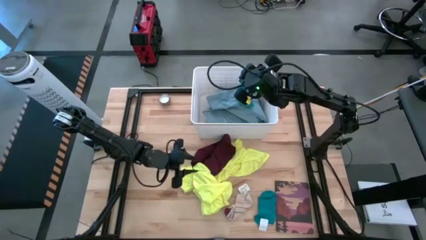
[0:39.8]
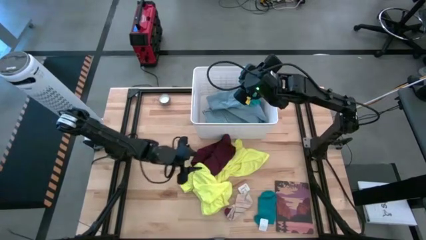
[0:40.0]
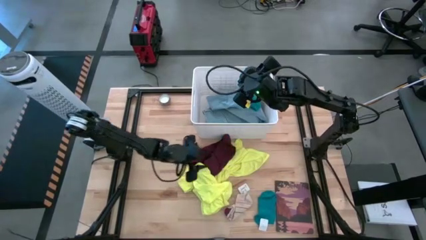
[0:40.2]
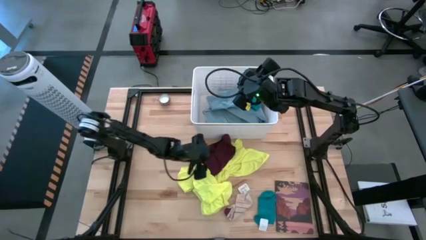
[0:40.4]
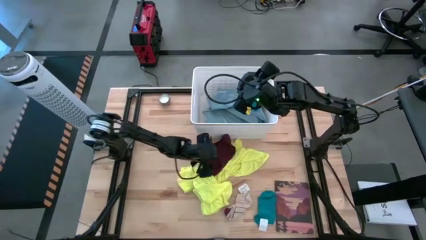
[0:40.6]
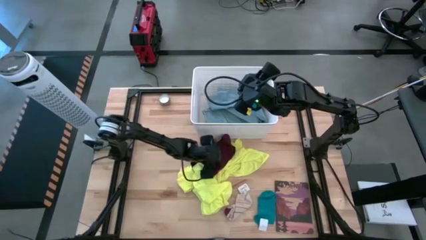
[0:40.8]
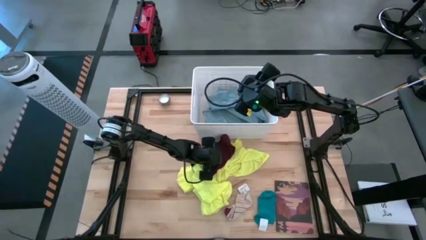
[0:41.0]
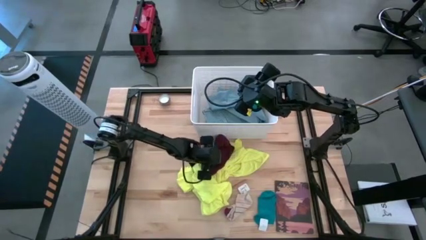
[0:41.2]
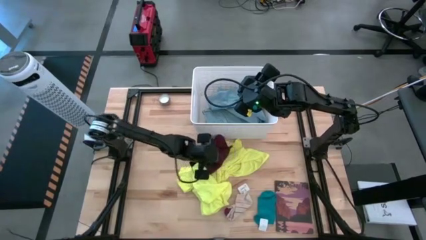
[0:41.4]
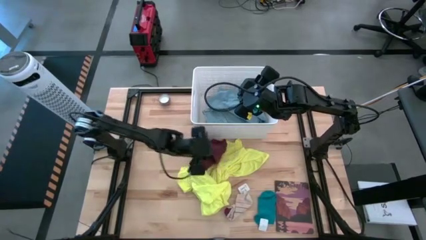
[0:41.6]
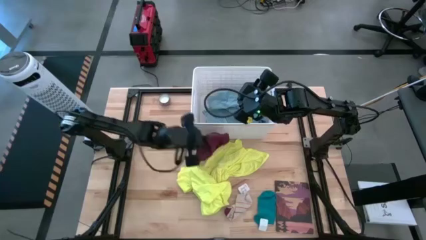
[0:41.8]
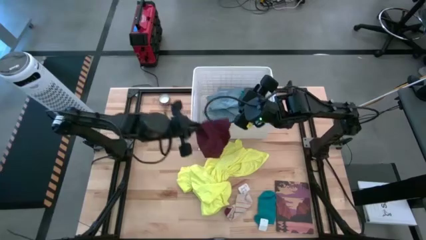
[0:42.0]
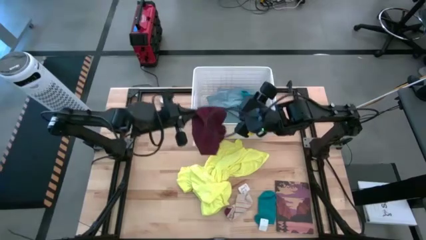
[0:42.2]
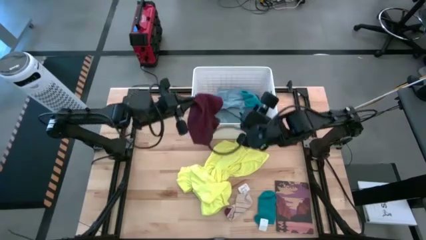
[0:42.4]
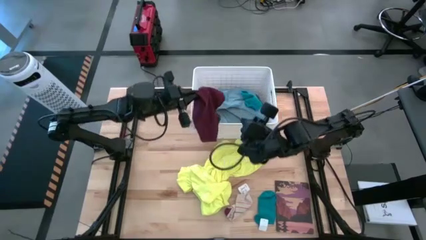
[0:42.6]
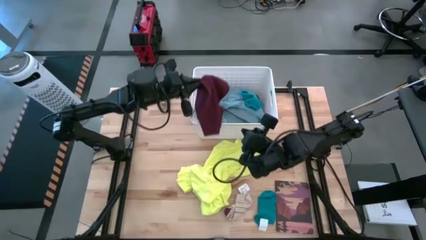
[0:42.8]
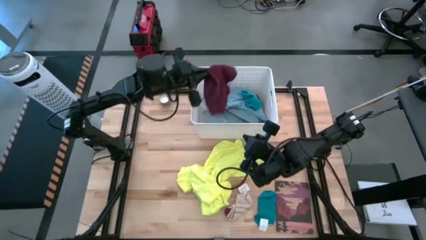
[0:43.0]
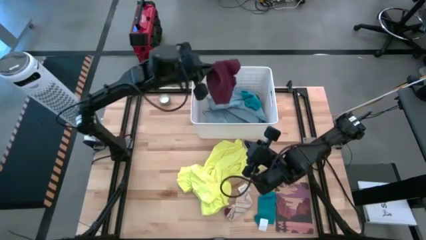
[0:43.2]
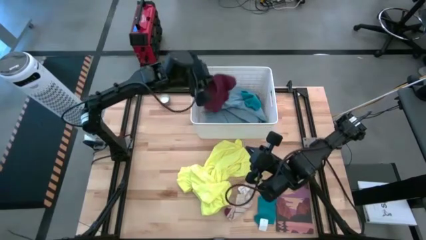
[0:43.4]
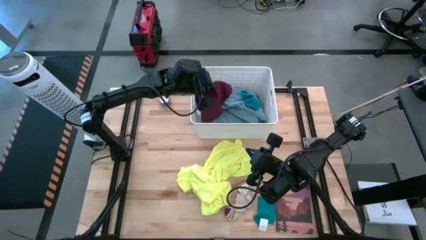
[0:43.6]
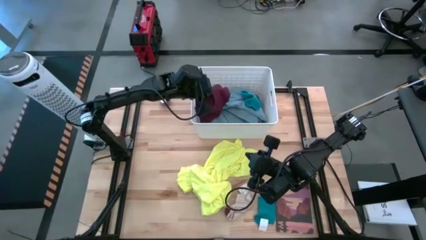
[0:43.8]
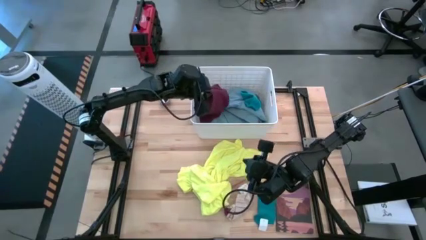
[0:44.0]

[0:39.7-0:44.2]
Task: Sort clothes
Put the dark red underwear into the white bin

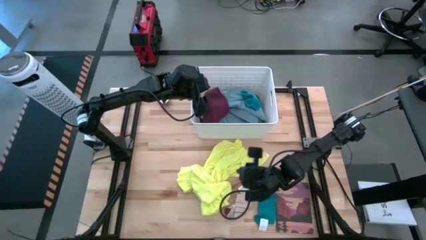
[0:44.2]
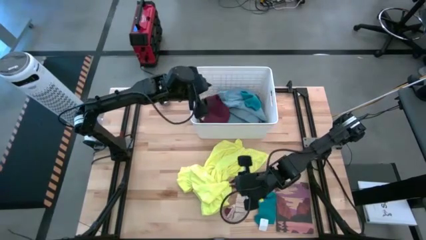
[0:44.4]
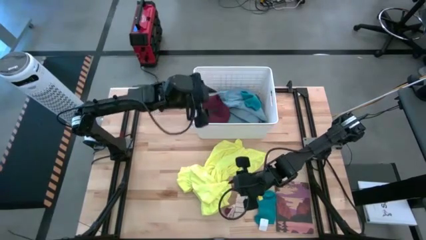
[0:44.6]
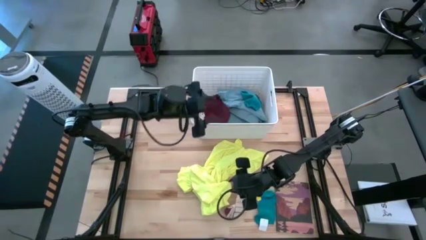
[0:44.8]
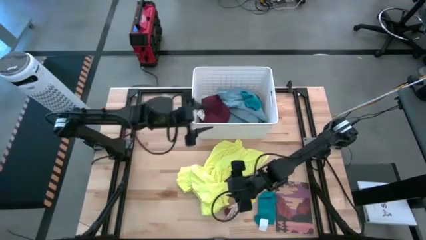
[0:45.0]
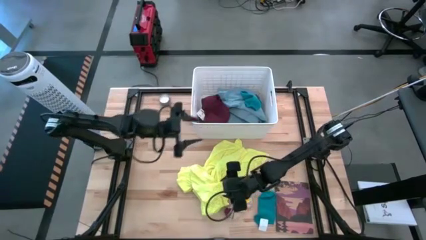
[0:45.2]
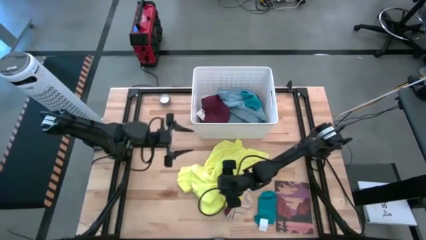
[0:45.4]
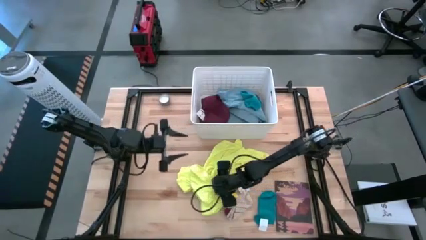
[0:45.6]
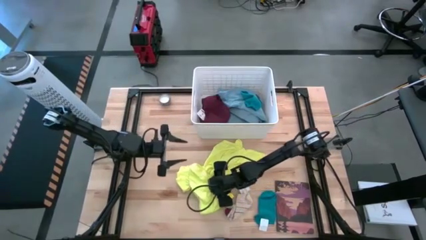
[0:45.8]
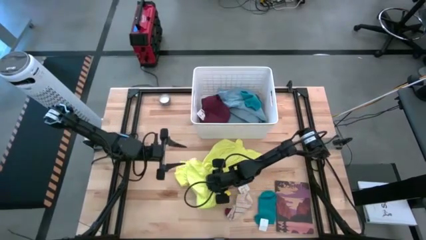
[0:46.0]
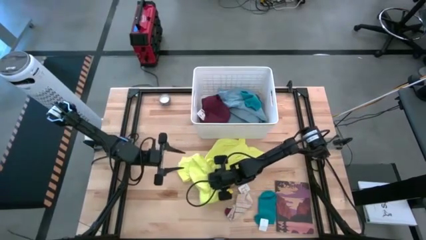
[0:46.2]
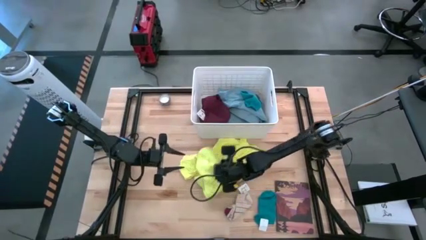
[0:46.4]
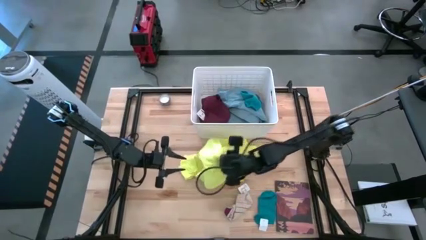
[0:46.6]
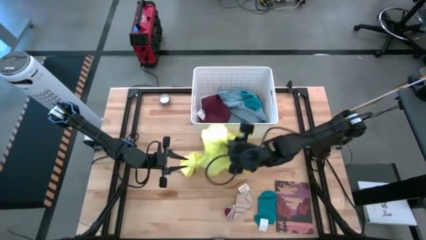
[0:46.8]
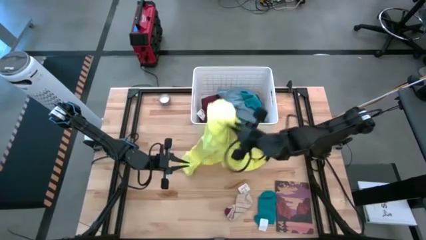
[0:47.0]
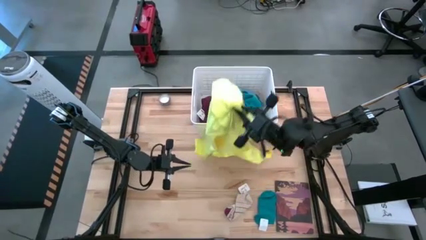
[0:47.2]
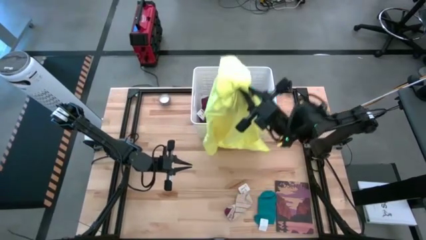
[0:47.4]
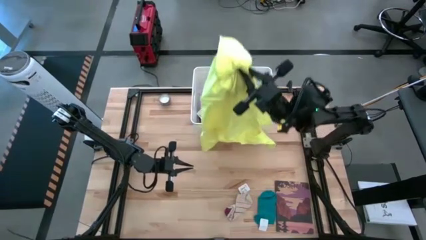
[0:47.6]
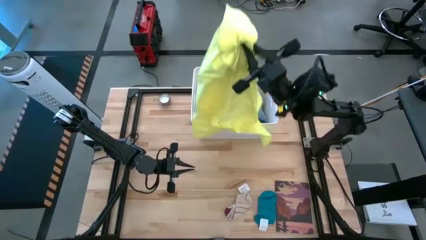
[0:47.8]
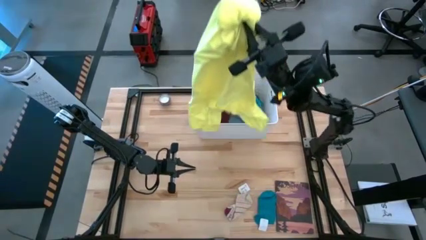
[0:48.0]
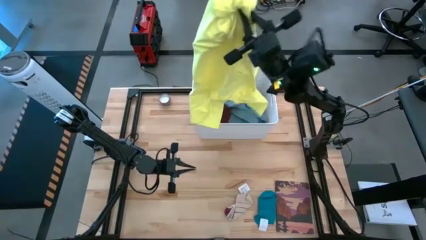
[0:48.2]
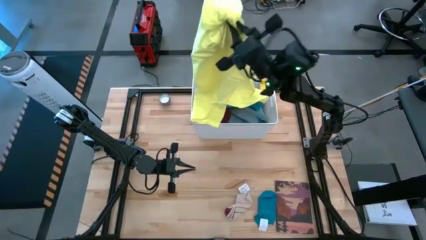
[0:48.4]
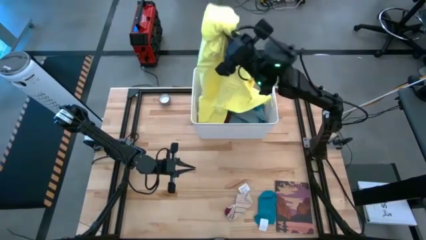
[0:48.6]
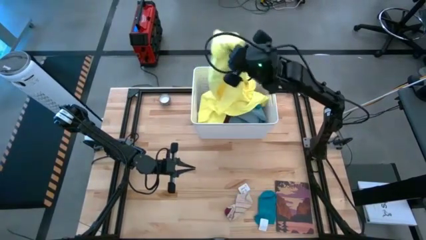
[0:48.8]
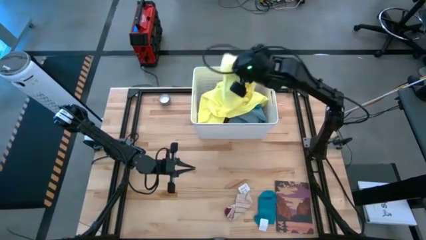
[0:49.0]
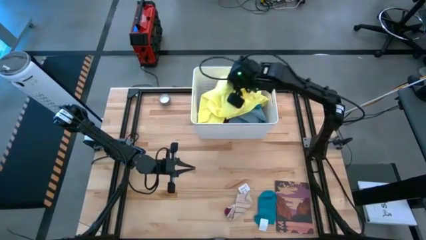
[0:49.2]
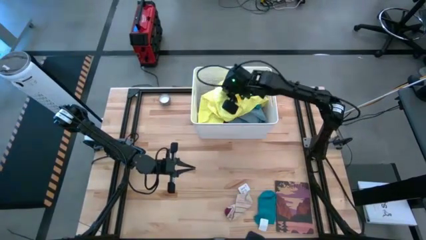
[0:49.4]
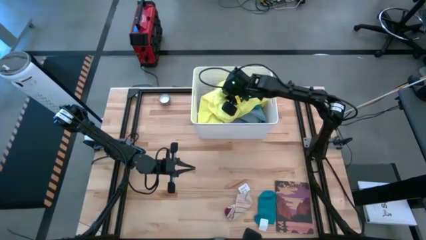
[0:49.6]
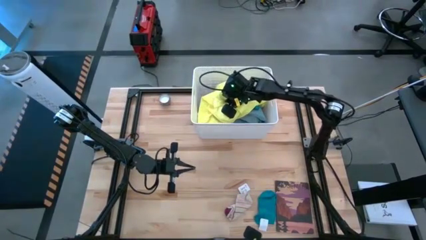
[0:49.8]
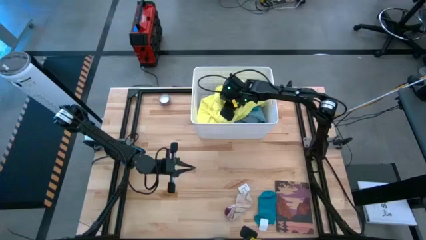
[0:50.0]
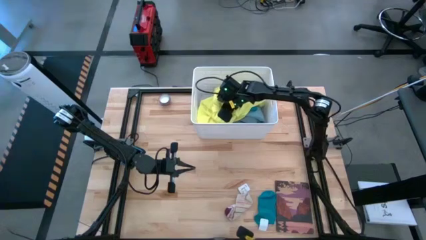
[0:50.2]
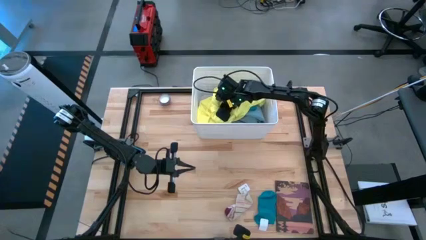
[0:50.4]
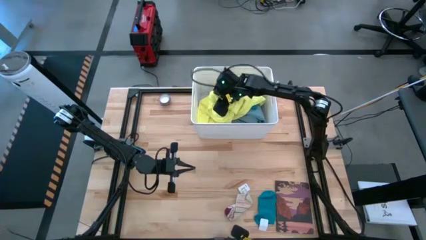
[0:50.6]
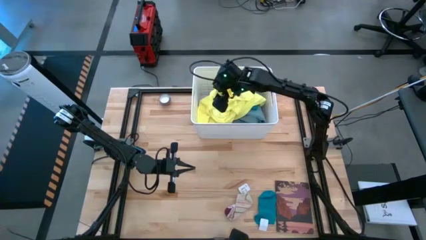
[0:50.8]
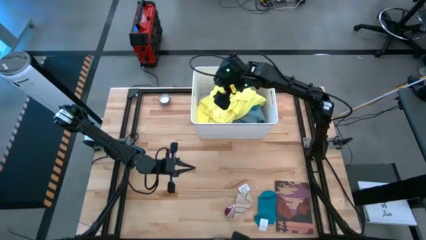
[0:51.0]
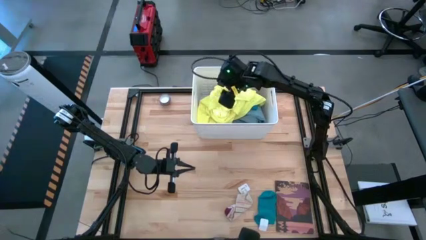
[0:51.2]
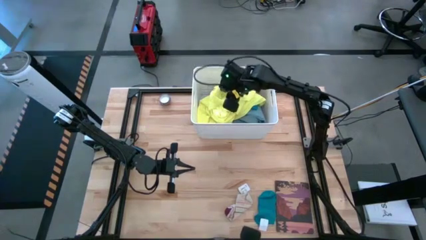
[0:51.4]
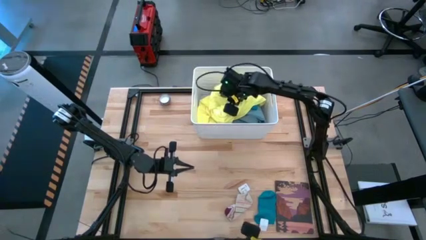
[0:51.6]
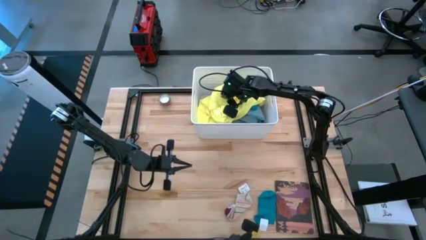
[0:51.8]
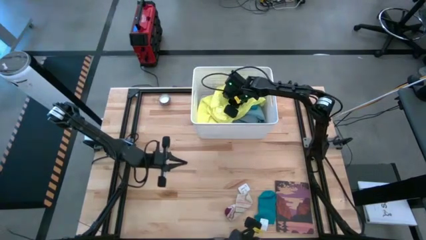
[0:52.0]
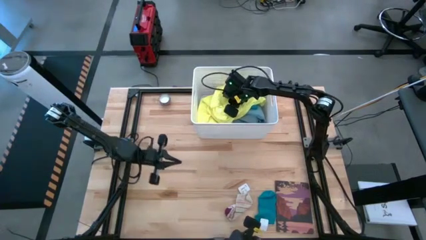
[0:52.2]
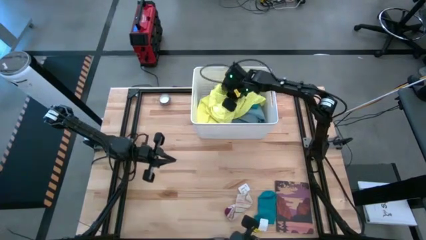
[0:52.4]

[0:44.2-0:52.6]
Put the yellow shirt into the white bin

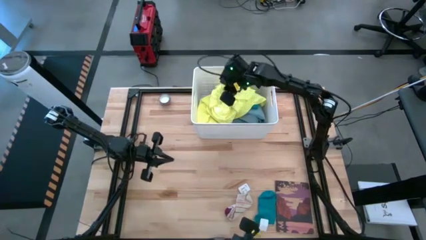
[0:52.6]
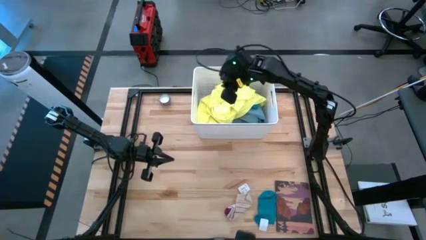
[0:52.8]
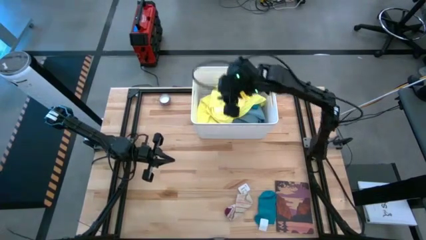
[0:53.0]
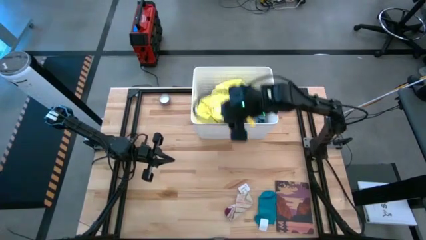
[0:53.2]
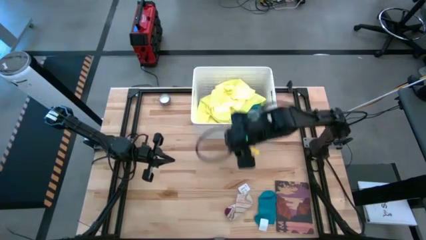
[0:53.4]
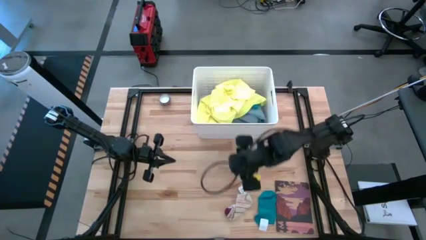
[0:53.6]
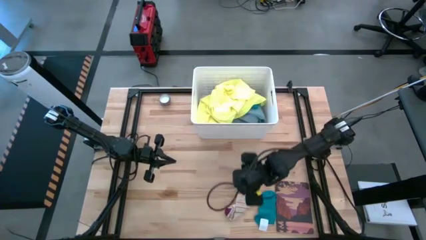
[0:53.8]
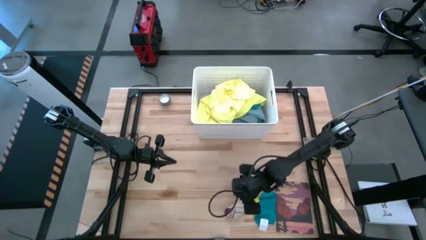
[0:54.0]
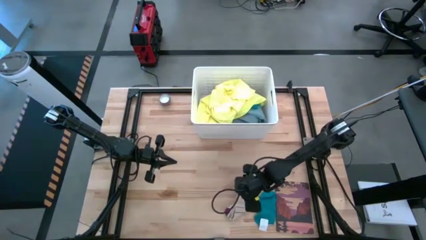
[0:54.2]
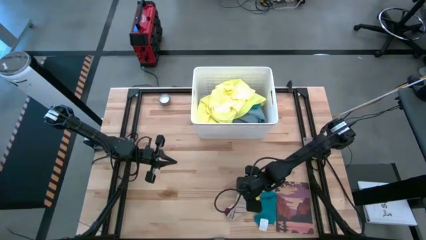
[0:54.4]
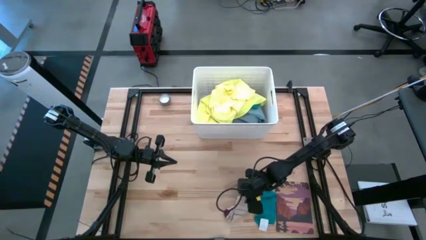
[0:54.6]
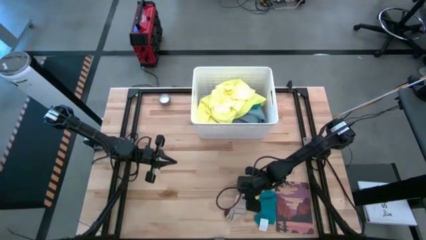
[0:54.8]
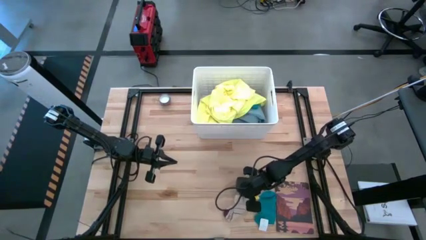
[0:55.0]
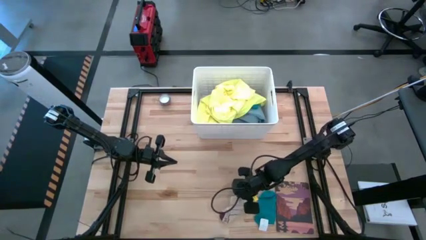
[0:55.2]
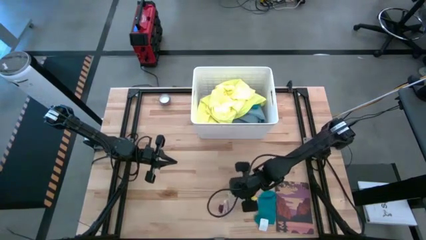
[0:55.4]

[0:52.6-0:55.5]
Put the red striped sock into the white bin
